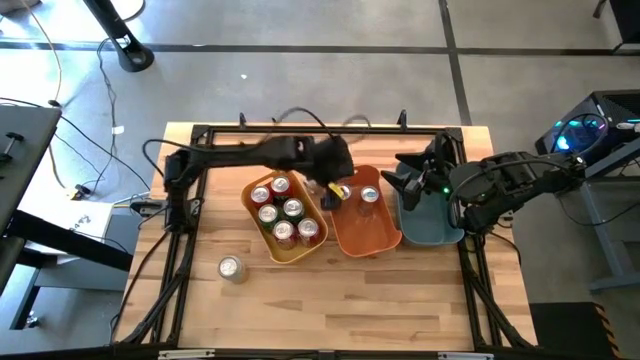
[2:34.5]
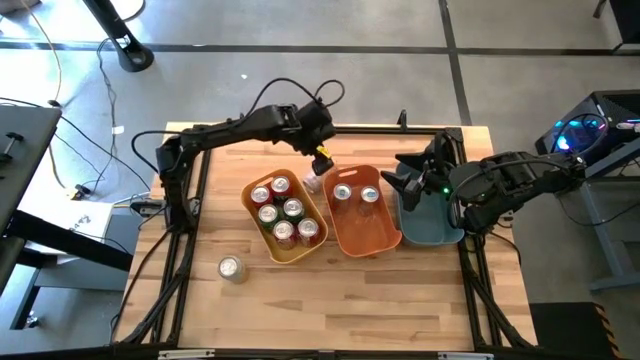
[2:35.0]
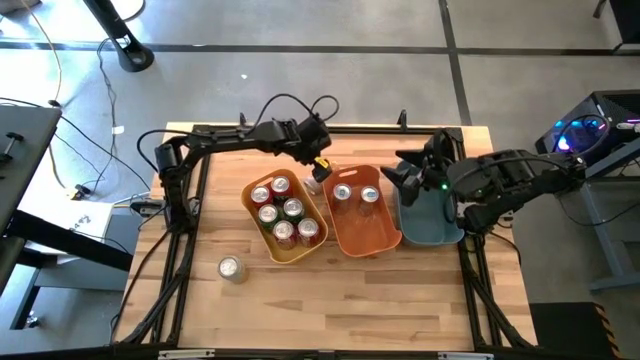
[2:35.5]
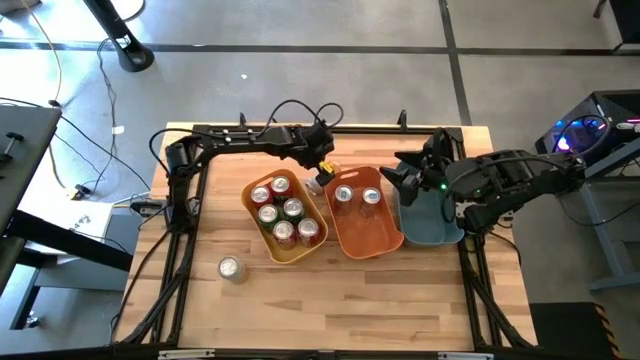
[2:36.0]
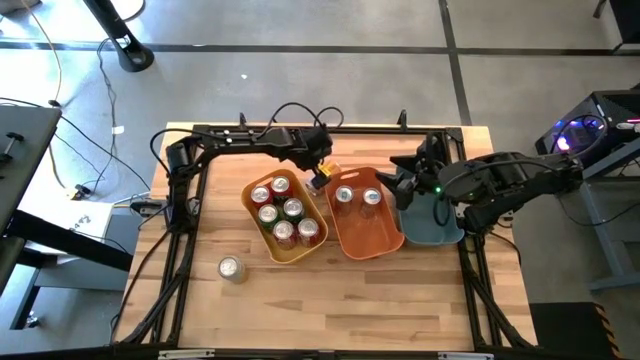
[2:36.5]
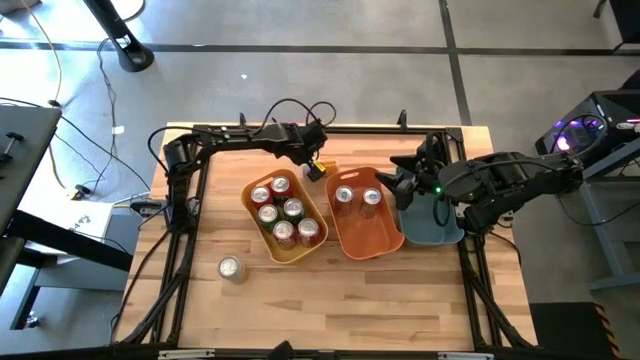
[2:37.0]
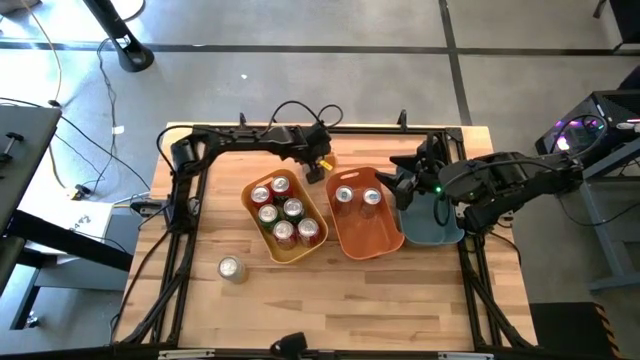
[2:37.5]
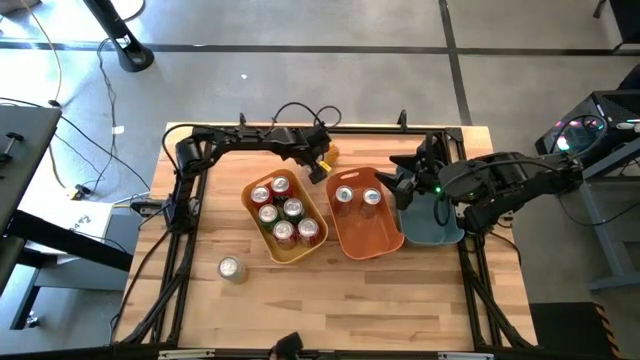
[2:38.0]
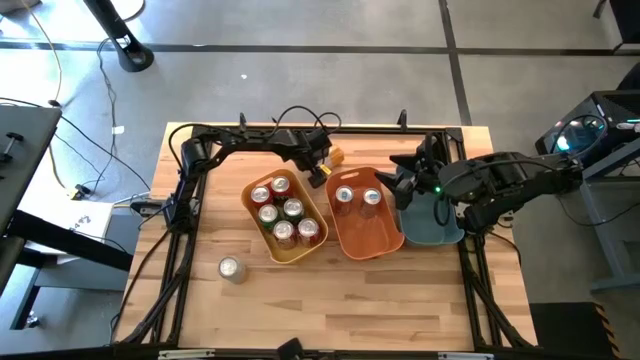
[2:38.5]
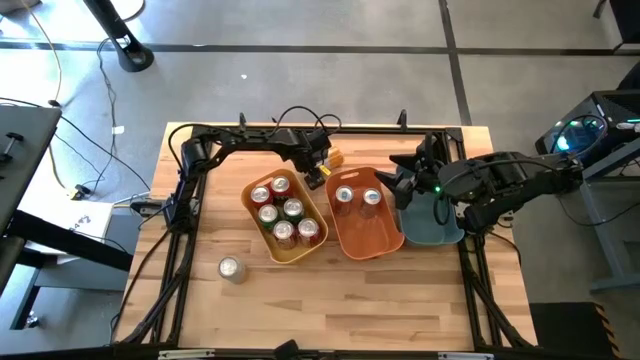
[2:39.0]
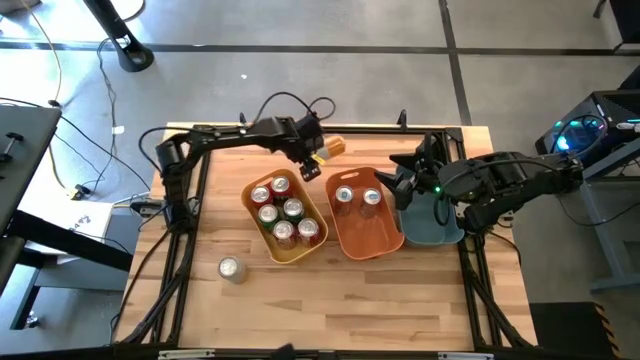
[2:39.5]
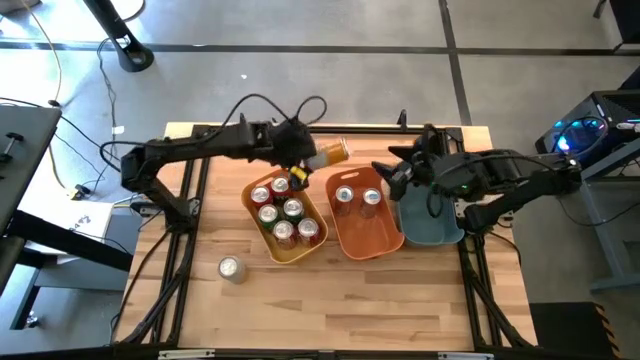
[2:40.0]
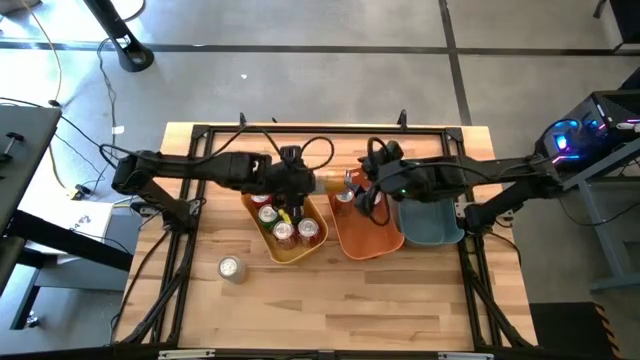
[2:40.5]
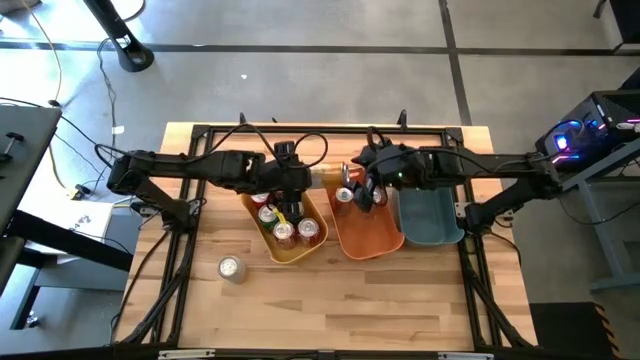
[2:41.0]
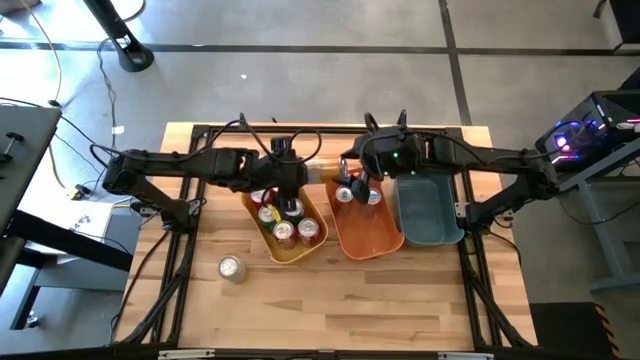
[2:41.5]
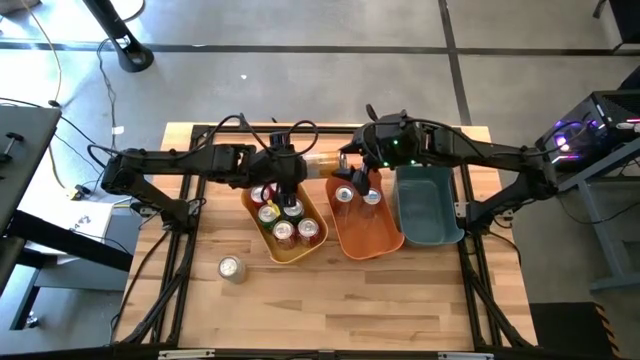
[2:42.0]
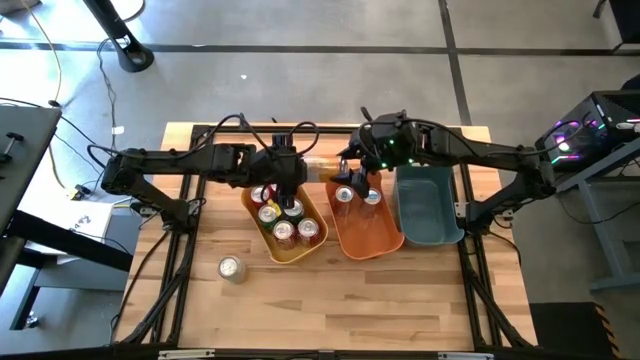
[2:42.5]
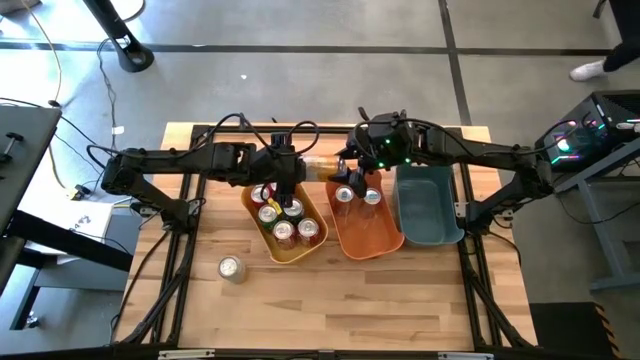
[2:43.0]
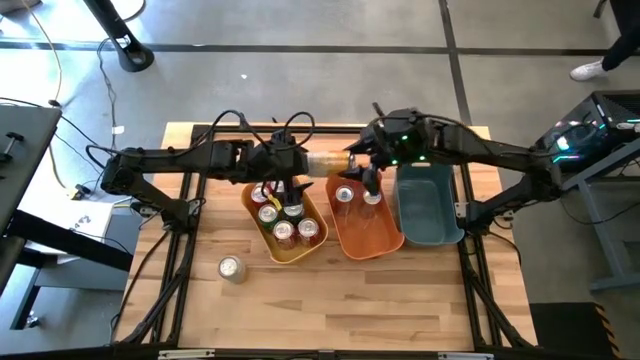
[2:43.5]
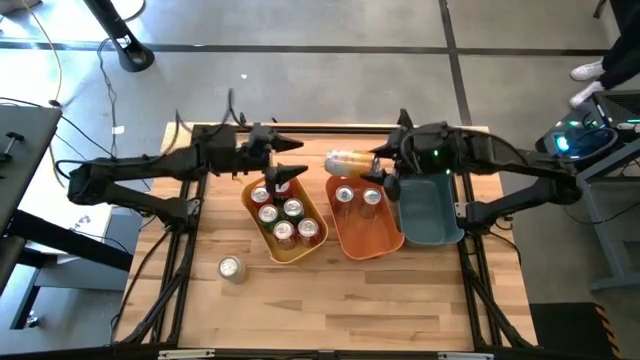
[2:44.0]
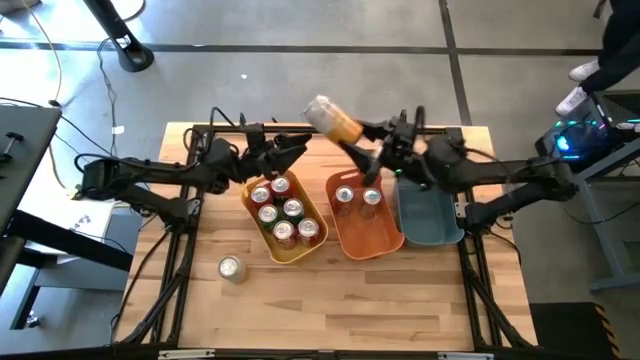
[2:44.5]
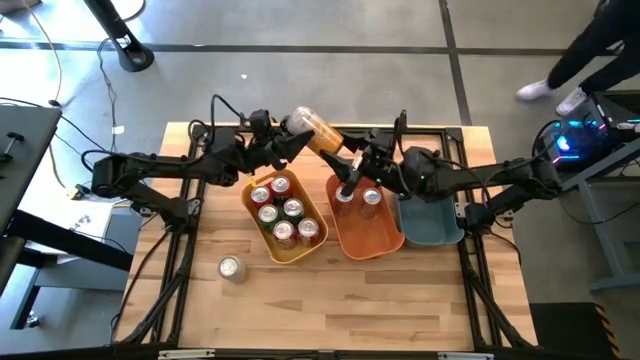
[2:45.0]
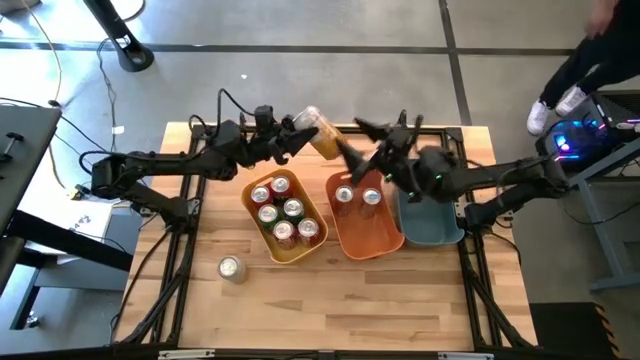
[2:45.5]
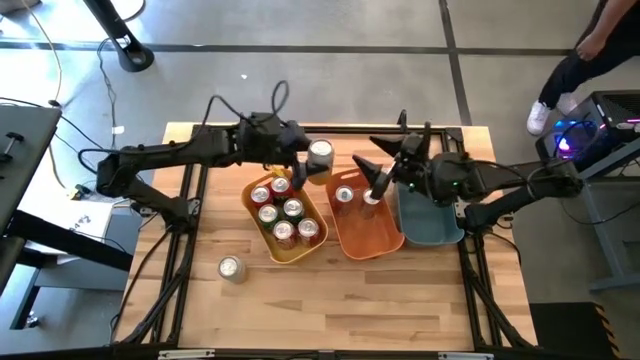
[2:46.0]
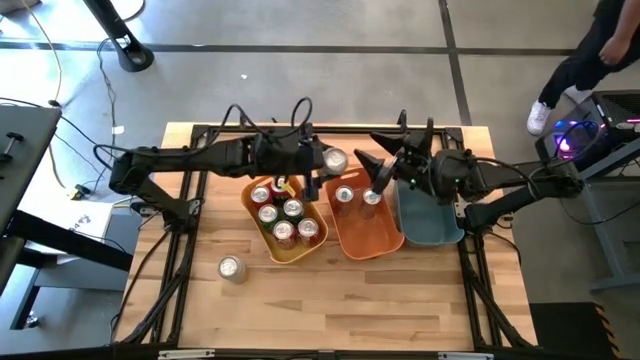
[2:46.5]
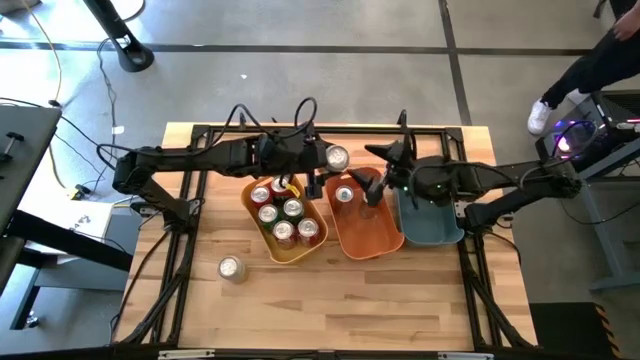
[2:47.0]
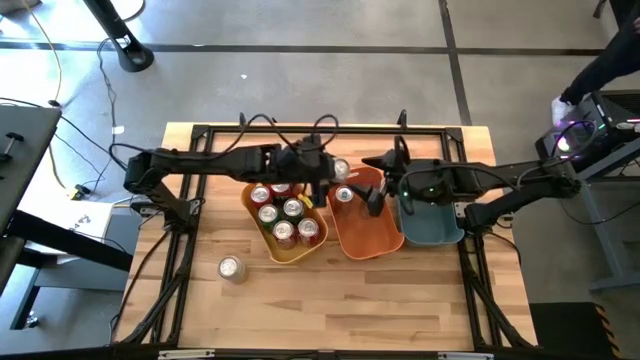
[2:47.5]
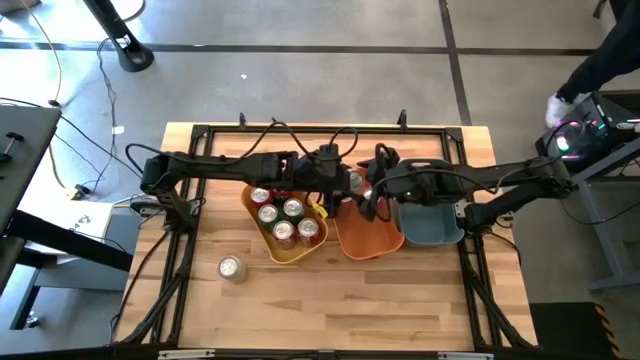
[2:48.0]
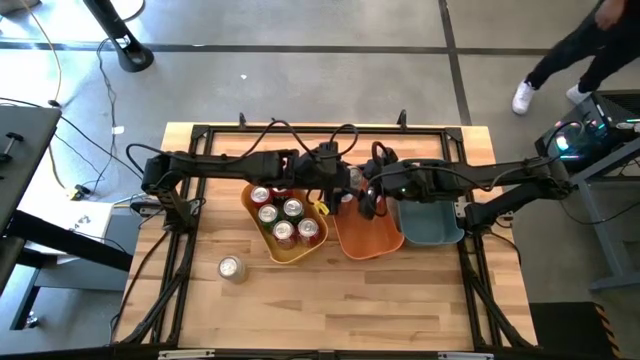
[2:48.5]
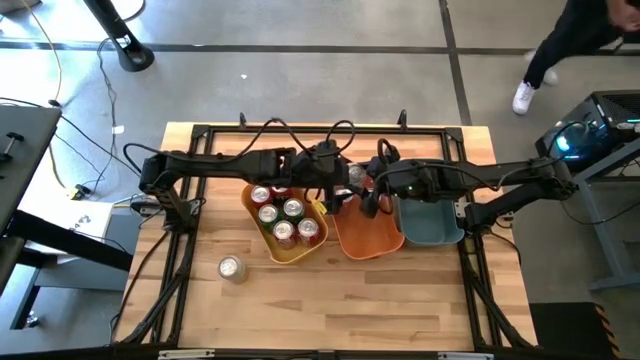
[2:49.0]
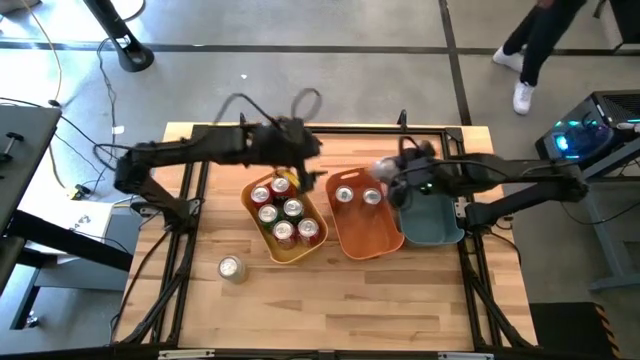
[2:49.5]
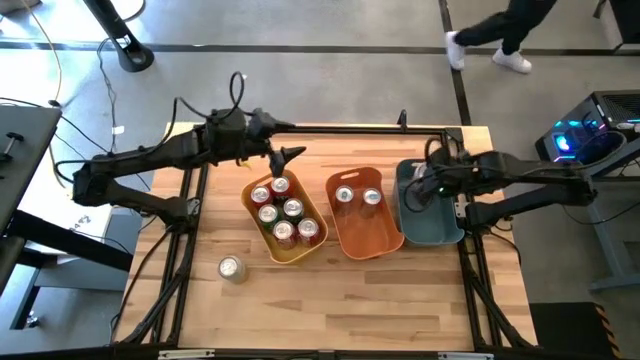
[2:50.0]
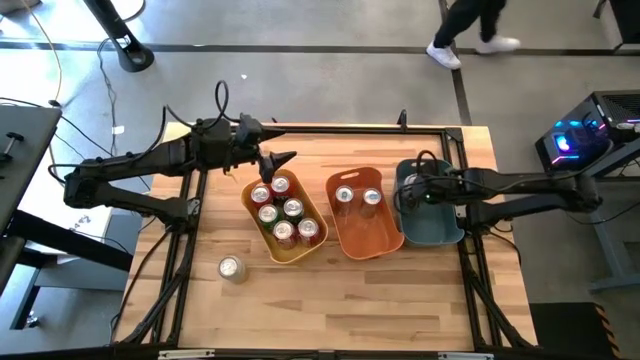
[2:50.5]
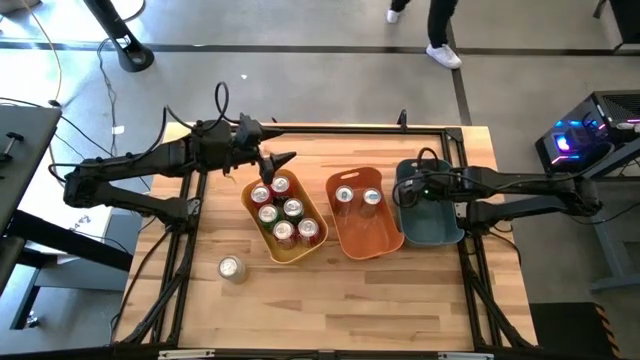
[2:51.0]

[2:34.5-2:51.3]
Task: Sort soda cans
Put the top yellow-white soda can into the blue bin

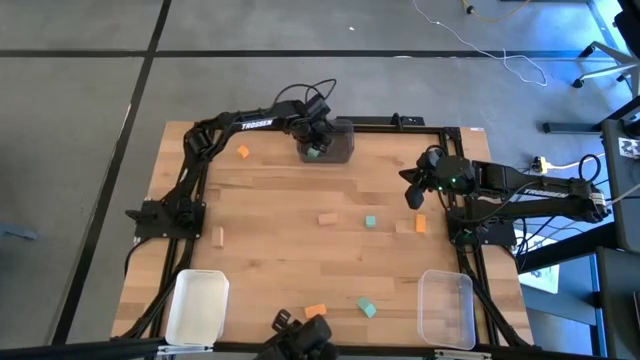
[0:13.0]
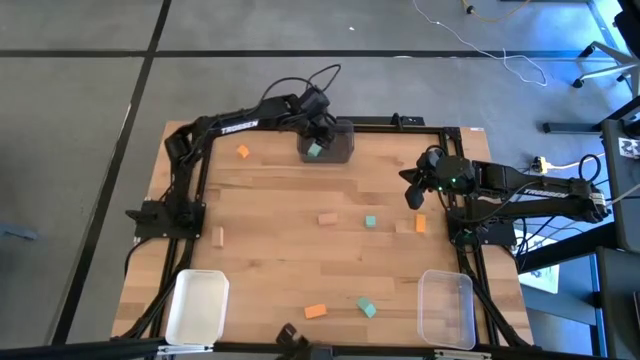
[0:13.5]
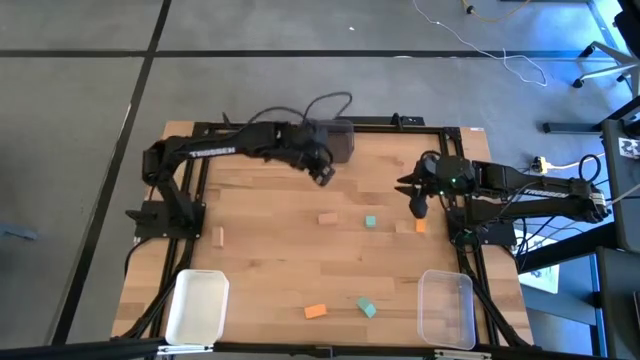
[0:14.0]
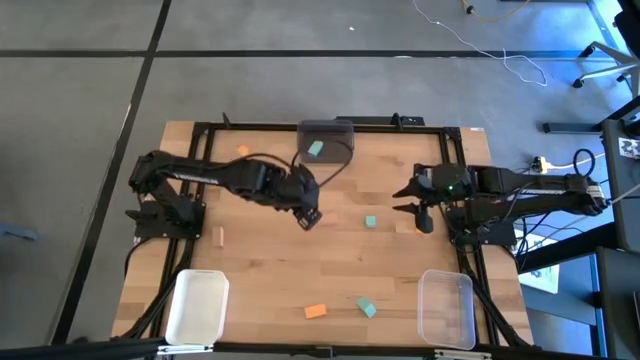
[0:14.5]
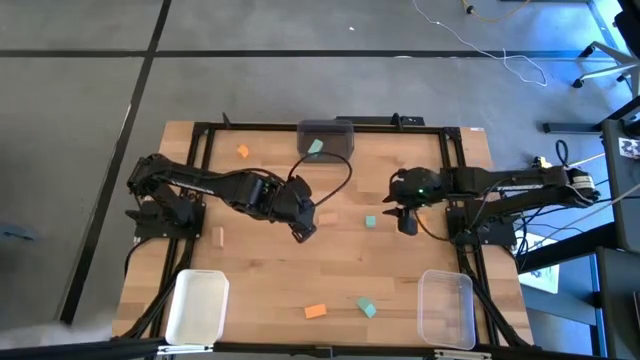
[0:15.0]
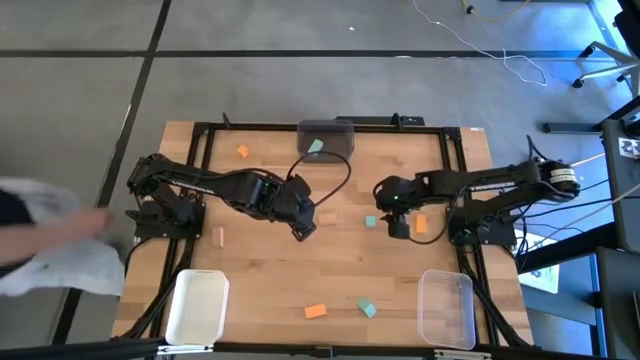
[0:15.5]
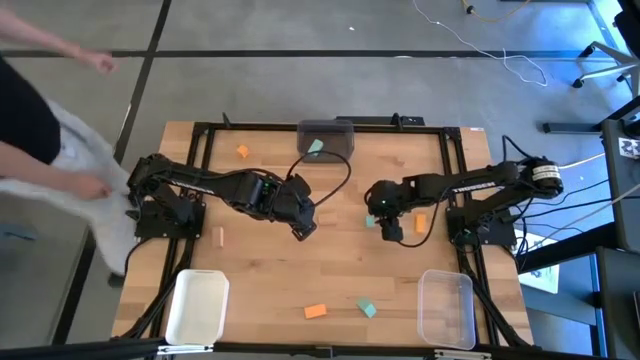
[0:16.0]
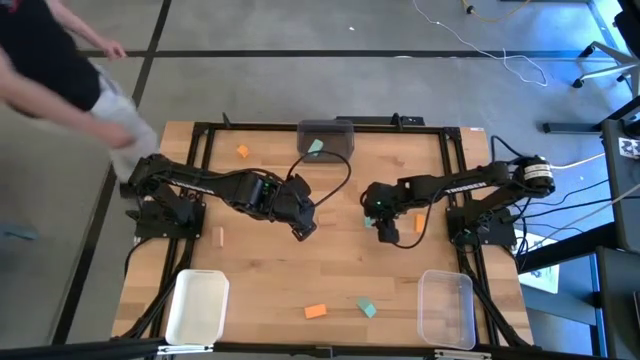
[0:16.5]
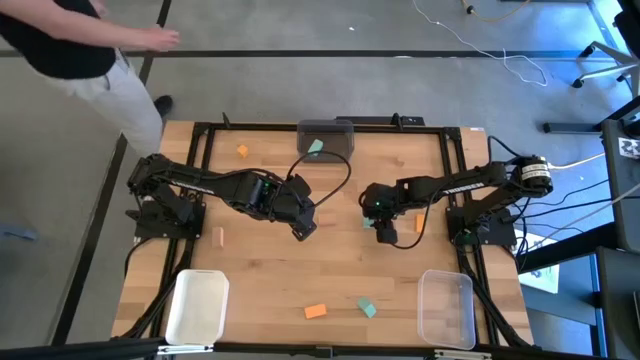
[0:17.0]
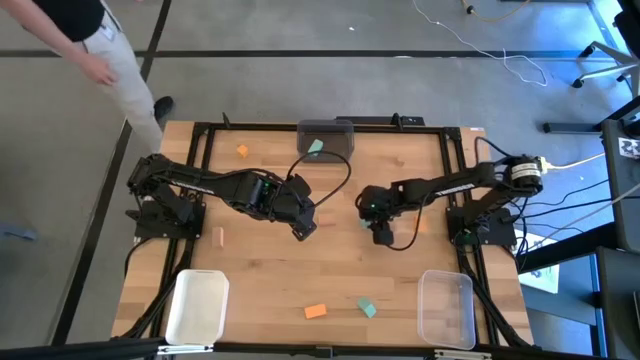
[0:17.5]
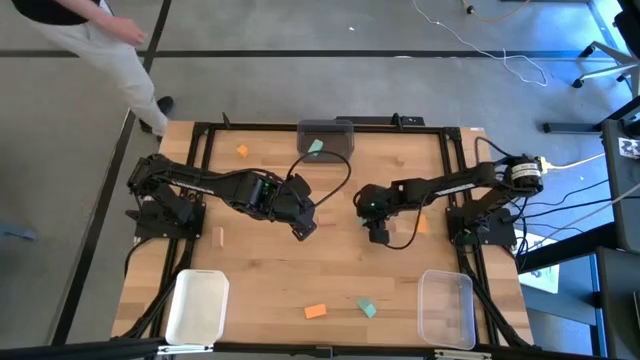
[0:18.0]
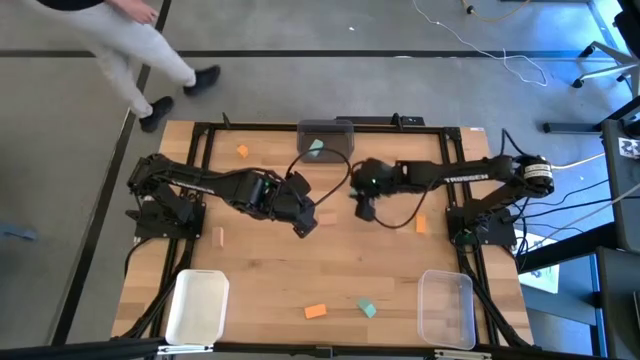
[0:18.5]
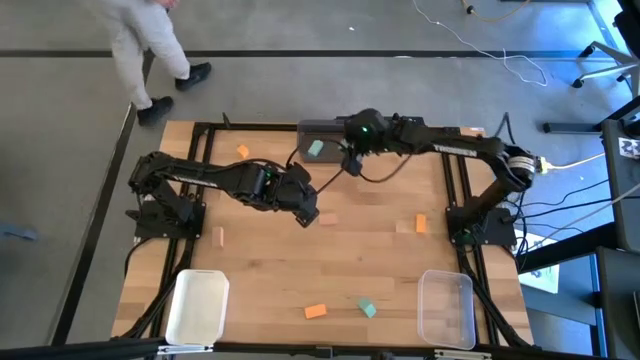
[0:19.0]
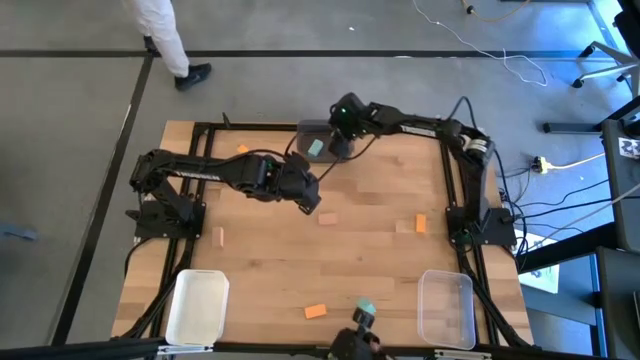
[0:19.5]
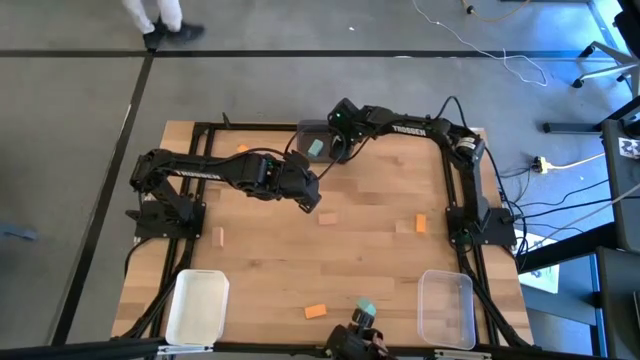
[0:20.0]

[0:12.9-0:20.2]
Task: Sort & place blocks by color
Put the top blue block into the black bin
